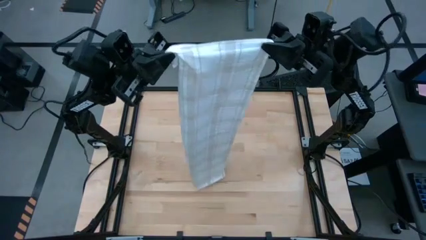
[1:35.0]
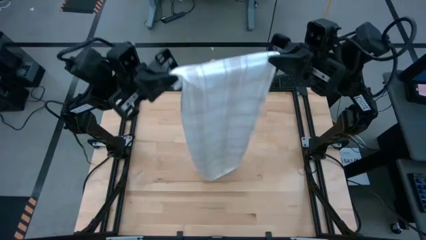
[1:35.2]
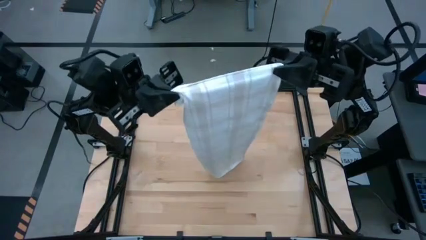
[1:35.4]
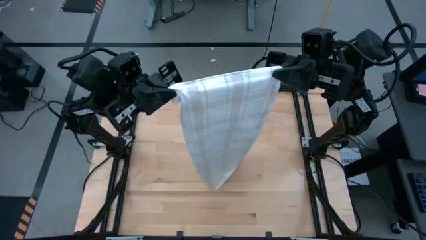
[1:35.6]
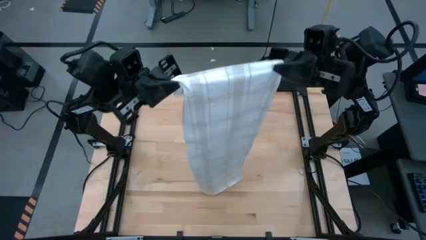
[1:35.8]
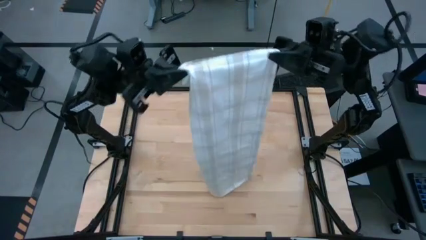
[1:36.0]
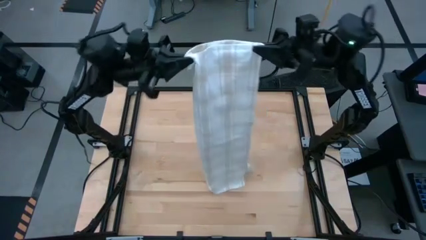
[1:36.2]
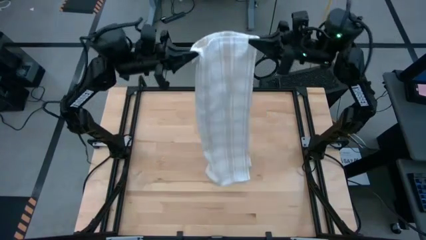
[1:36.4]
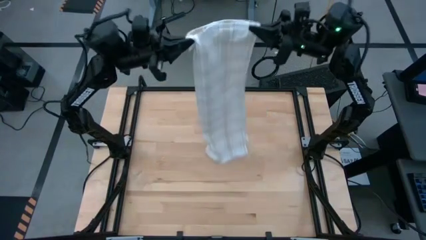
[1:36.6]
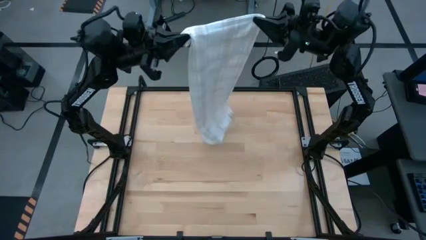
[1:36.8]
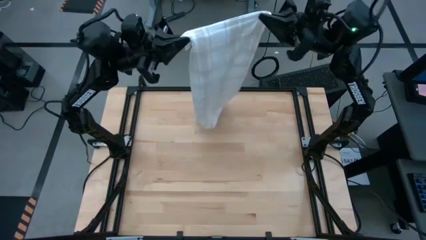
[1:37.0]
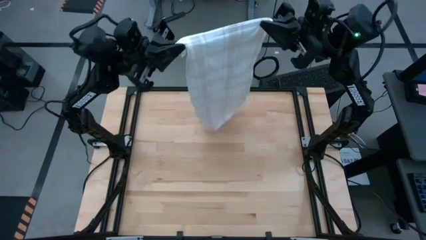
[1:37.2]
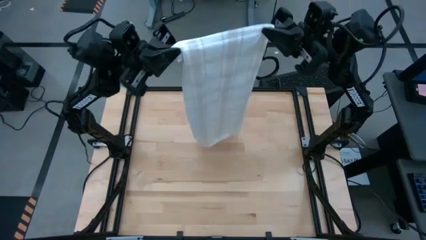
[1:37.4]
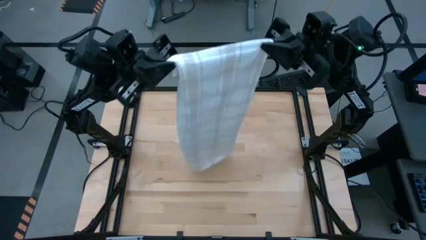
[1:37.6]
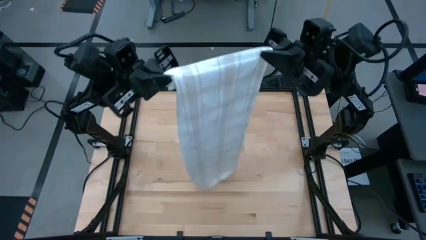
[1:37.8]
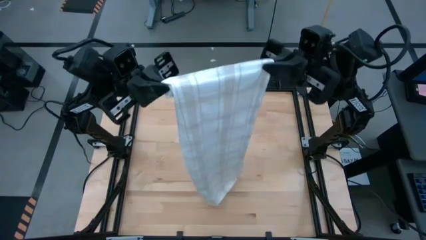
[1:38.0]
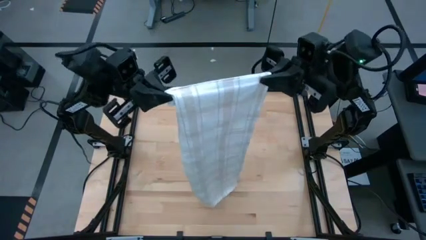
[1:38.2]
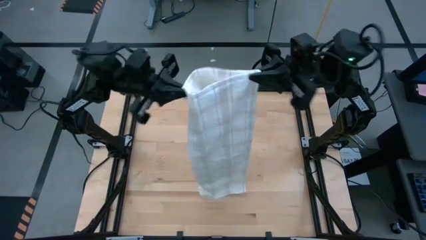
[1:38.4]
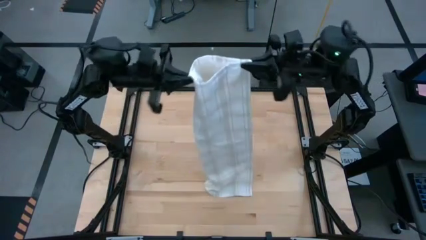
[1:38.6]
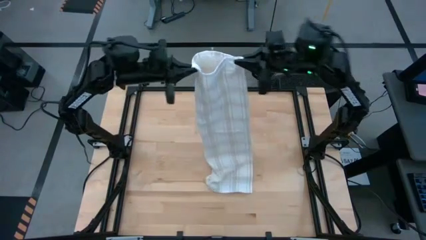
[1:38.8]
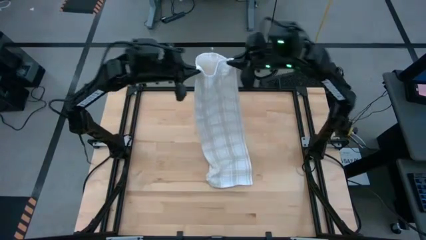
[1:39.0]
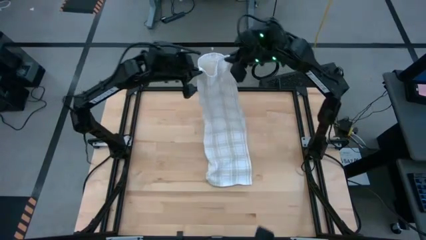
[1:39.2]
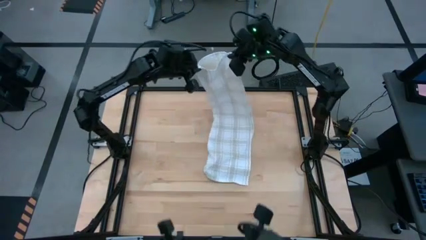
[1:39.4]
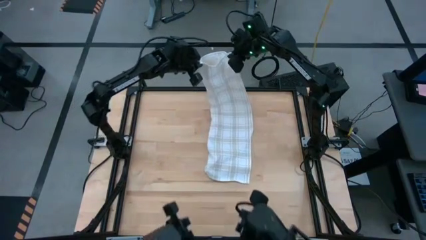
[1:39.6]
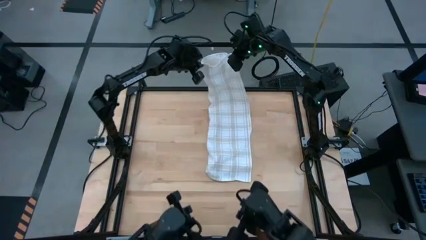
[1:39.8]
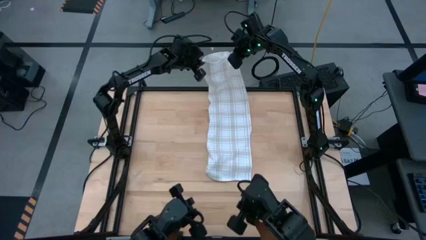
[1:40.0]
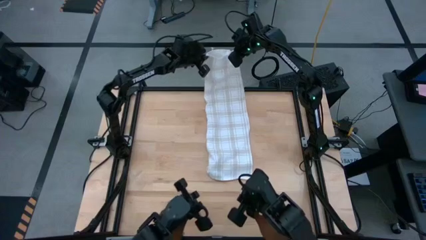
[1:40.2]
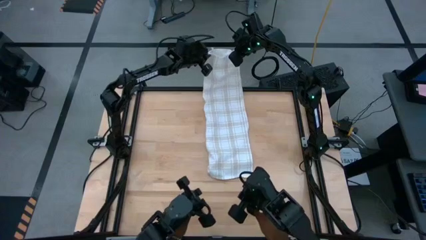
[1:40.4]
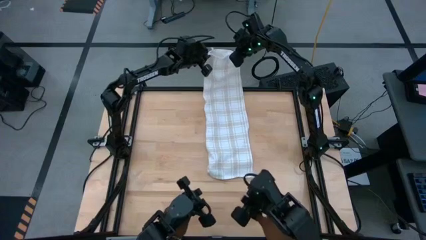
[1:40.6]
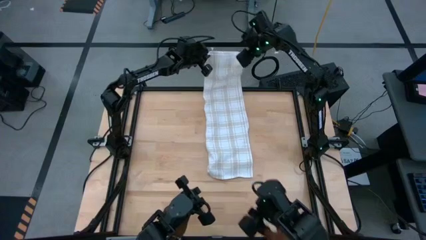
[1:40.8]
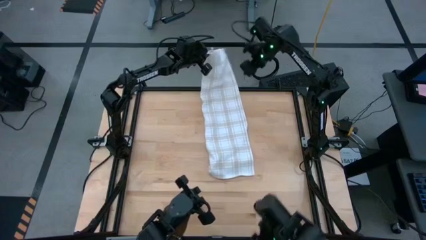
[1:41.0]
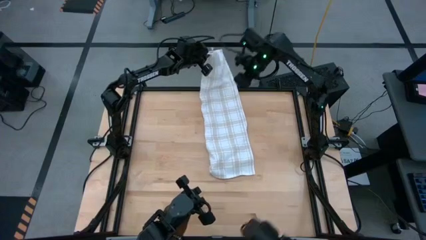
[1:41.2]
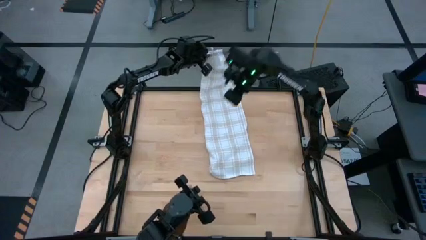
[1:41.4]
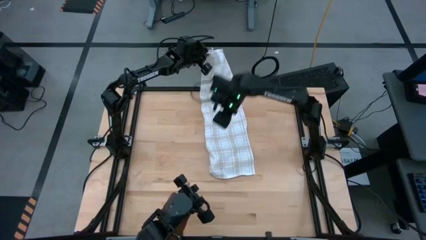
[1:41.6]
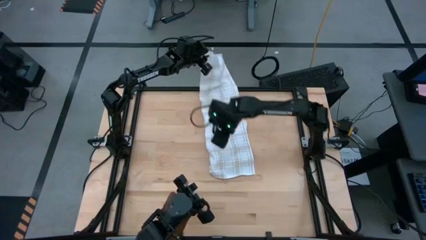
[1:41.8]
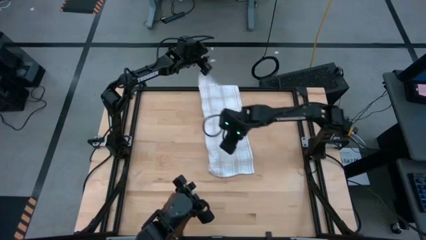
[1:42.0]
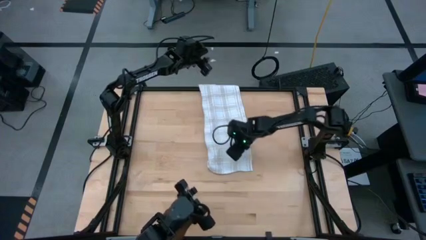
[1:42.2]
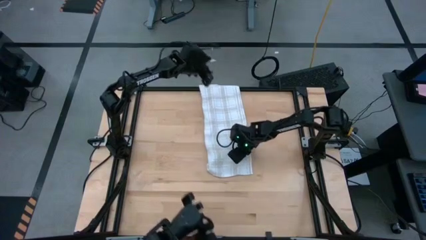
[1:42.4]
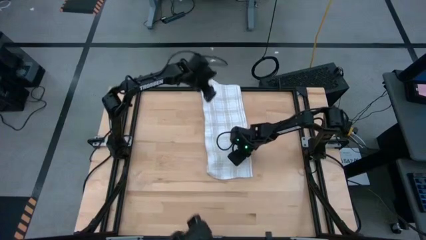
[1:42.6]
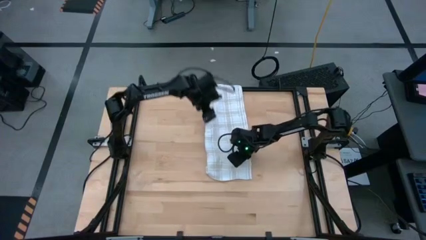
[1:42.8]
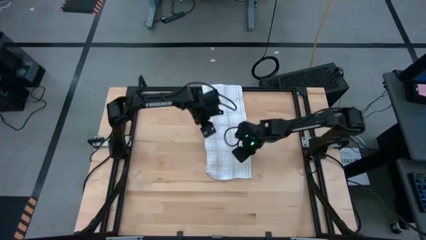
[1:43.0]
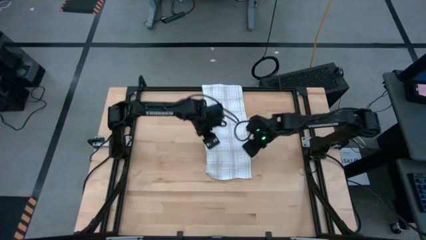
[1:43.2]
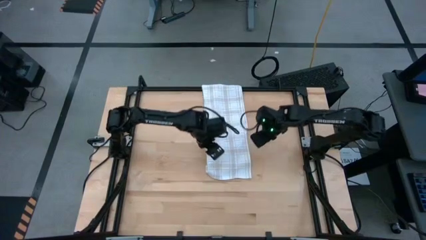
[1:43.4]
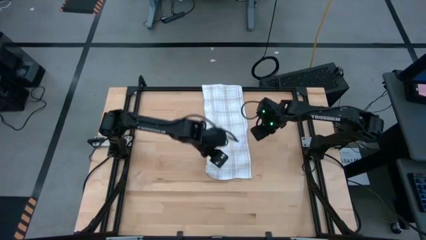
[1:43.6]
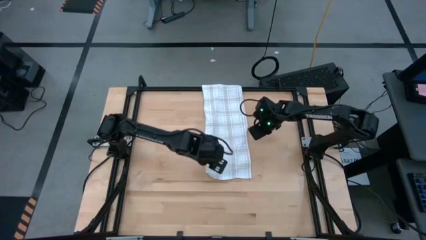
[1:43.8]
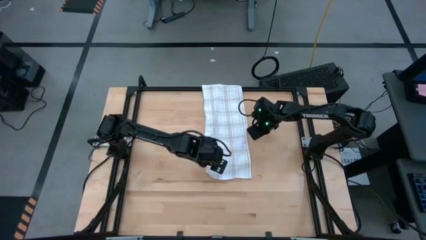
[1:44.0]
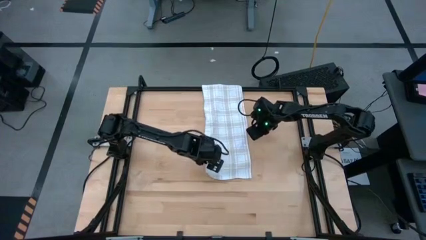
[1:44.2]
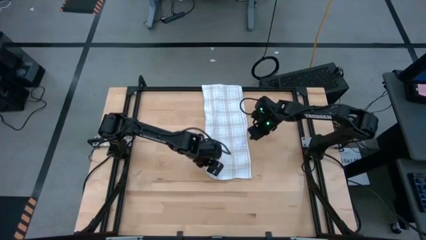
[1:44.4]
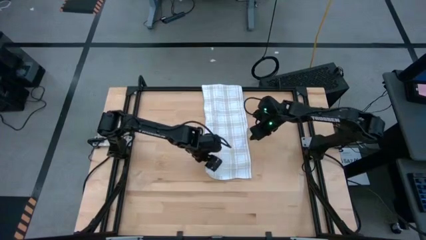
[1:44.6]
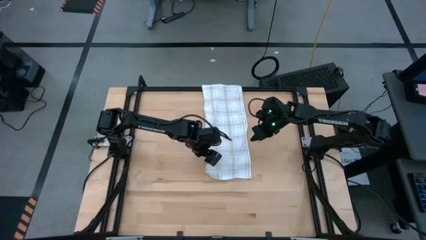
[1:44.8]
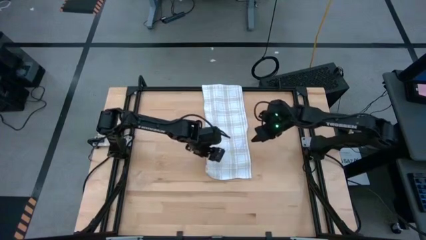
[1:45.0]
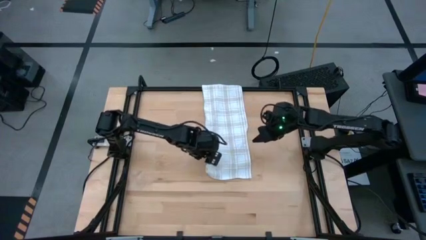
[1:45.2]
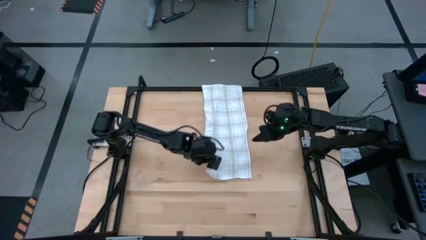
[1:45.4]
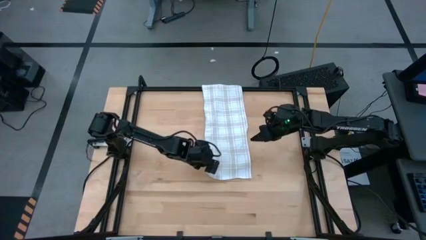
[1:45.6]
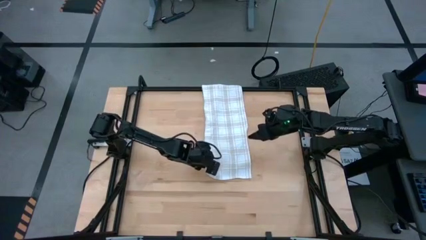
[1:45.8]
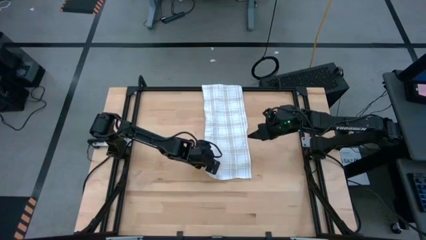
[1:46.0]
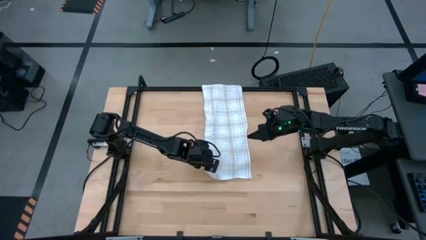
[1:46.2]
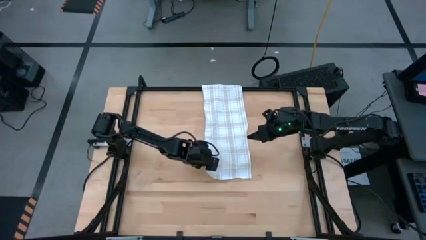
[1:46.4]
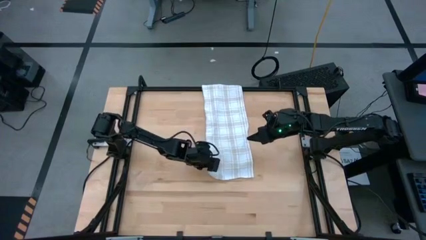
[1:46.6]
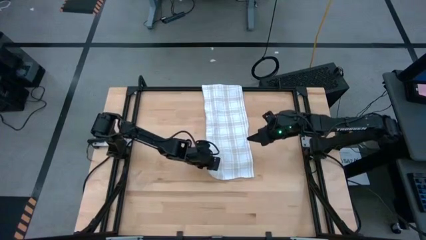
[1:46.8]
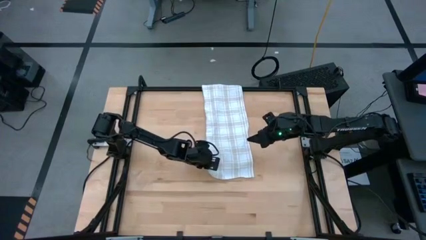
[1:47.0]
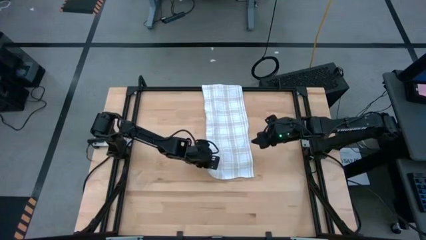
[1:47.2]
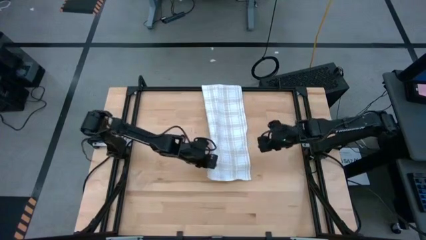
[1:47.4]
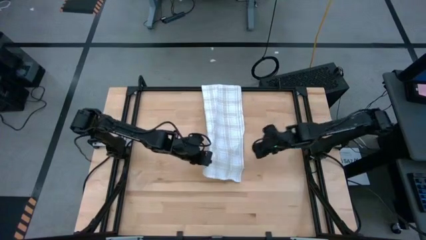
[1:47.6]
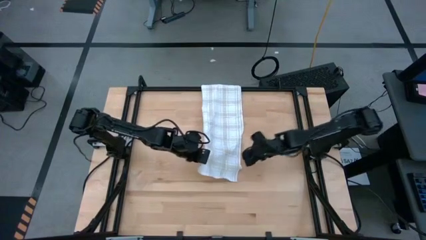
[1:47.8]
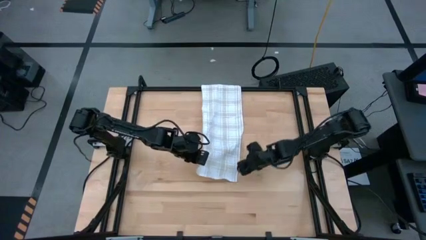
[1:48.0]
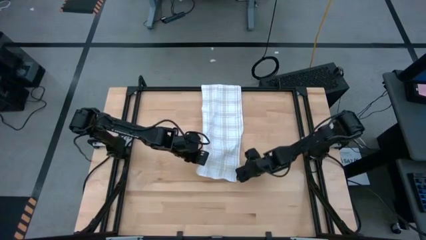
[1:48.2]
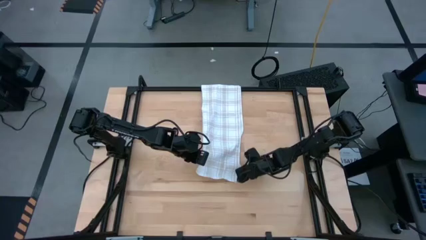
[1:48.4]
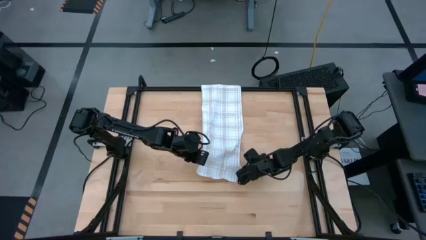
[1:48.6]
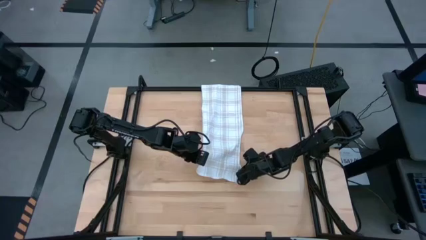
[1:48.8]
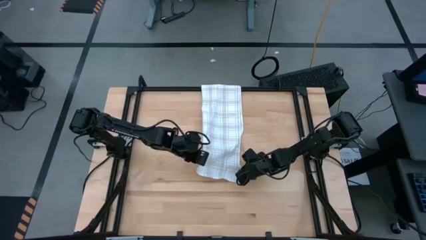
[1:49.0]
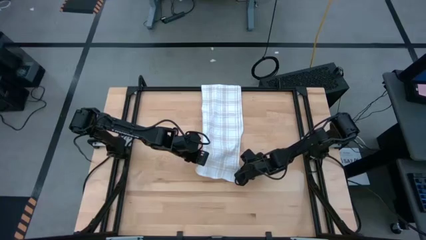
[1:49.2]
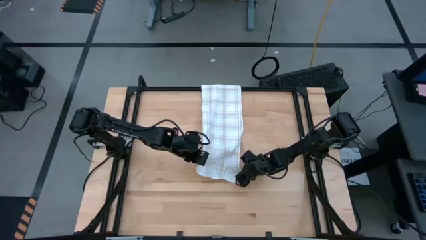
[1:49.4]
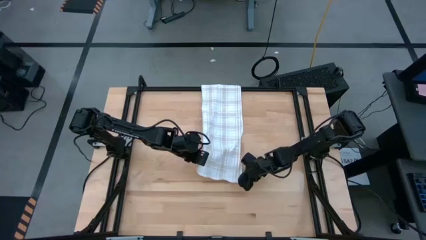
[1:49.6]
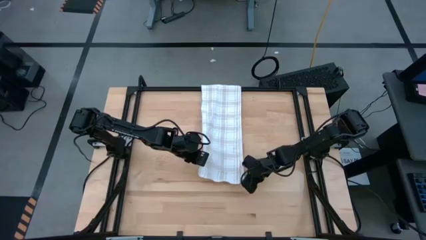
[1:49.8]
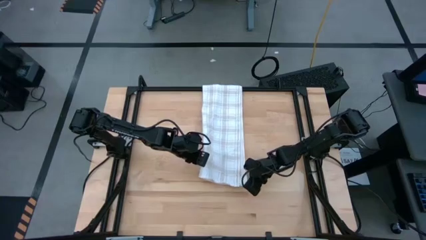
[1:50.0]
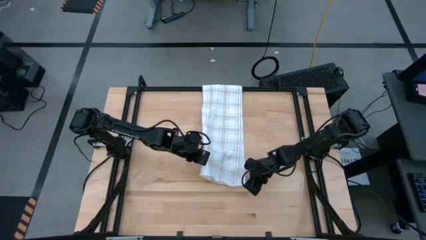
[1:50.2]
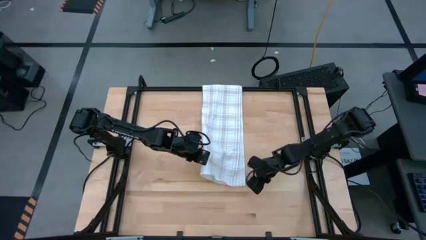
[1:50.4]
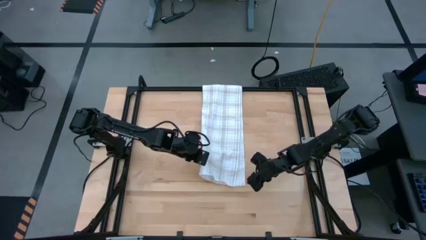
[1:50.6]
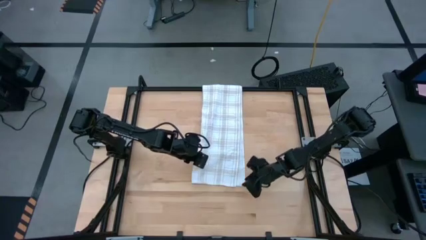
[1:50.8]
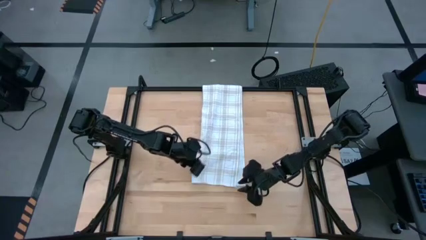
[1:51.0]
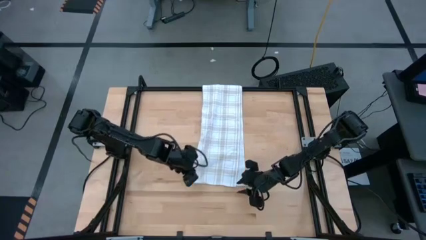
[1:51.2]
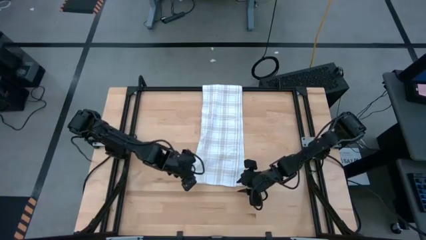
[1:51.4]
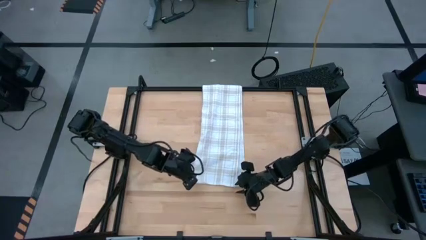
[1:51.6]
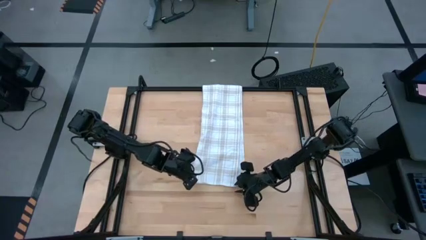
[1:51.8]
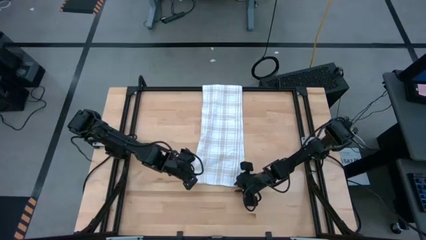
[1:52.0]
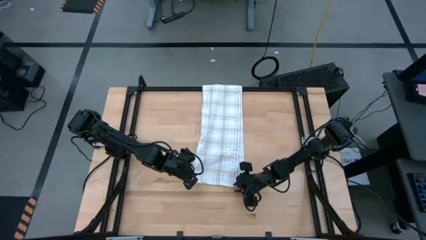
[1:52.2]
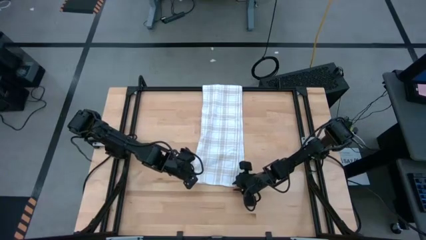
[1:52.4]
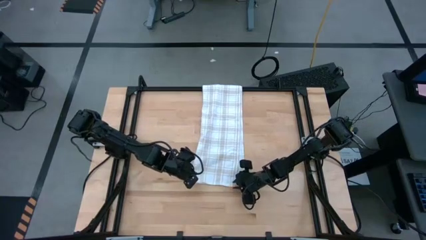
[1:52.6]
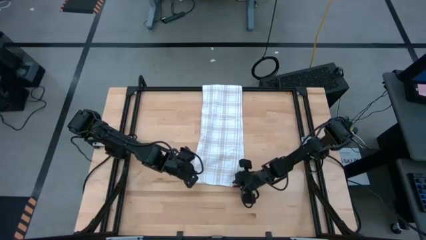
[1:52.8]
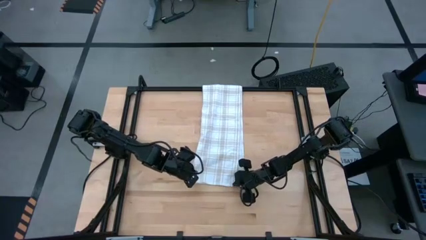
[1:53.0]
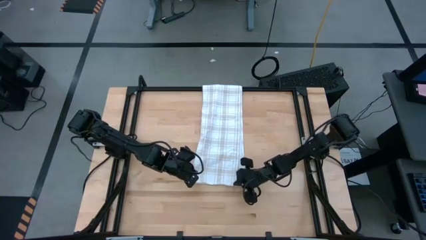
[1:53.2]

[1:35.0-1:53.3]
Task: Roll towel into tight, uniform cylinder
Roll the white towel
